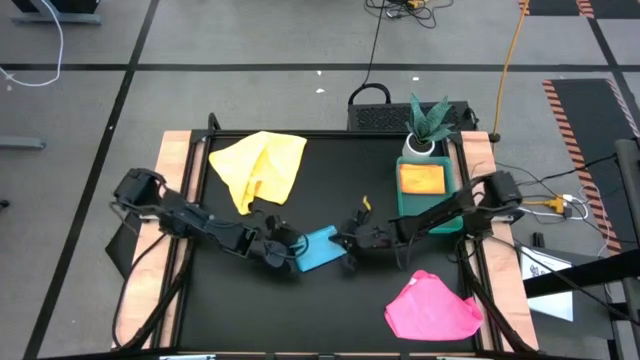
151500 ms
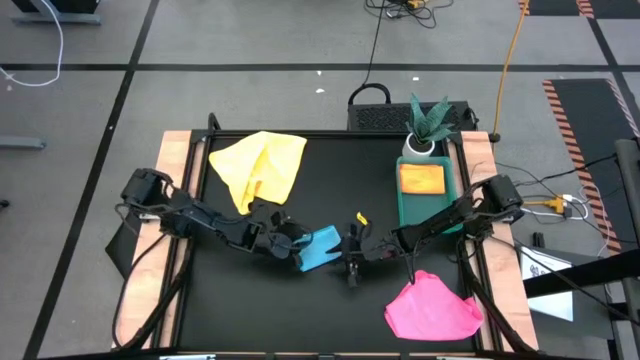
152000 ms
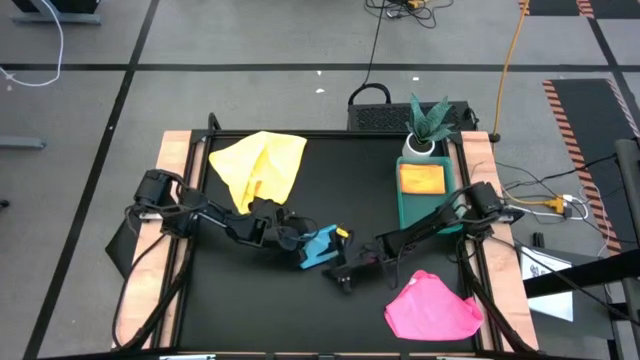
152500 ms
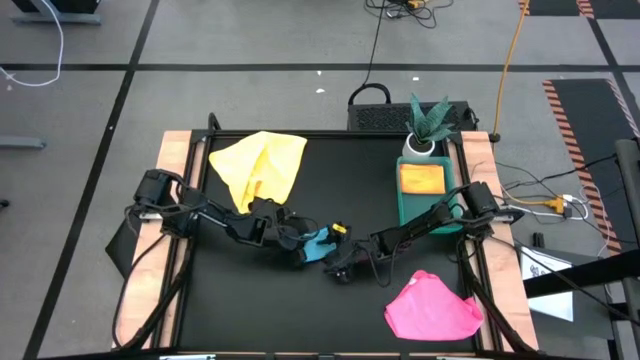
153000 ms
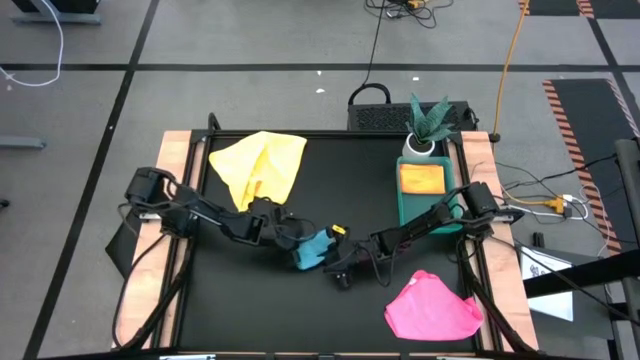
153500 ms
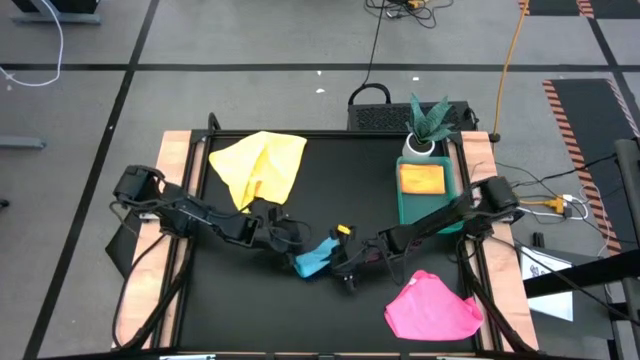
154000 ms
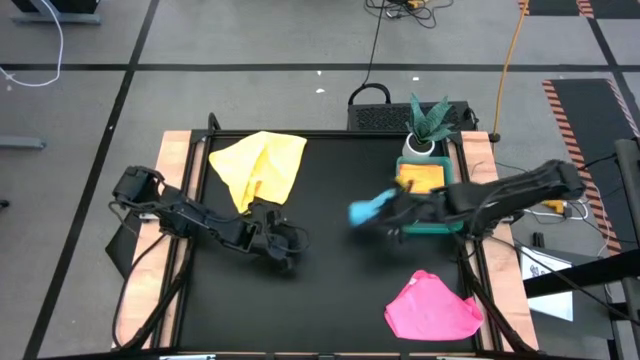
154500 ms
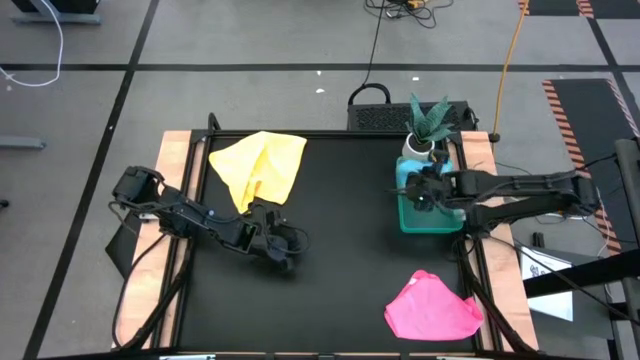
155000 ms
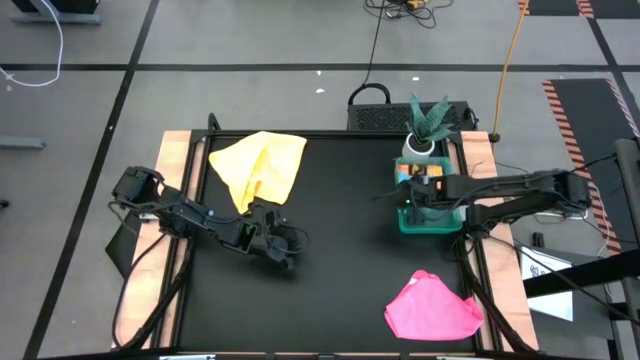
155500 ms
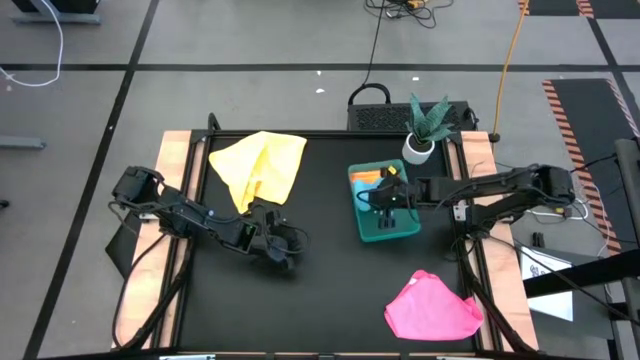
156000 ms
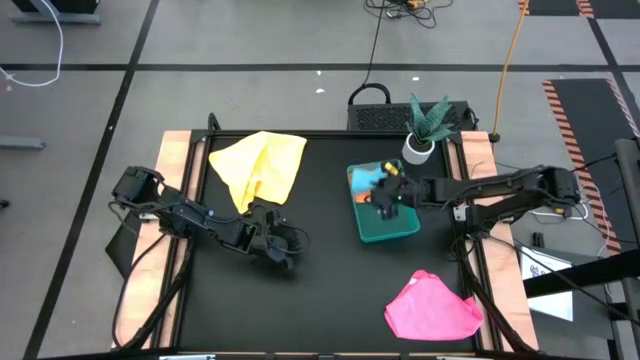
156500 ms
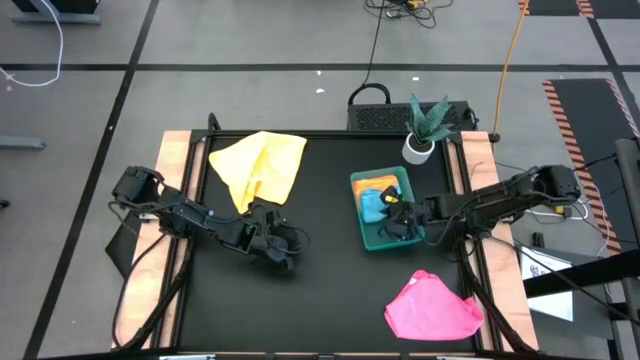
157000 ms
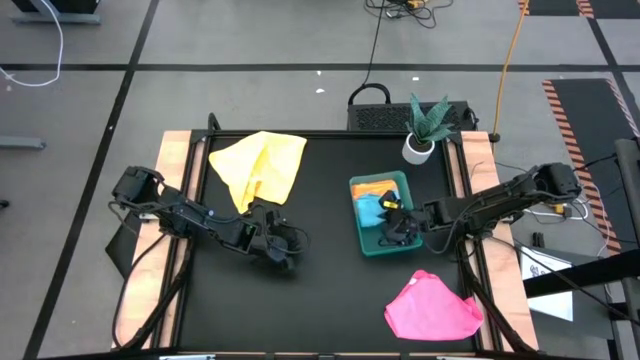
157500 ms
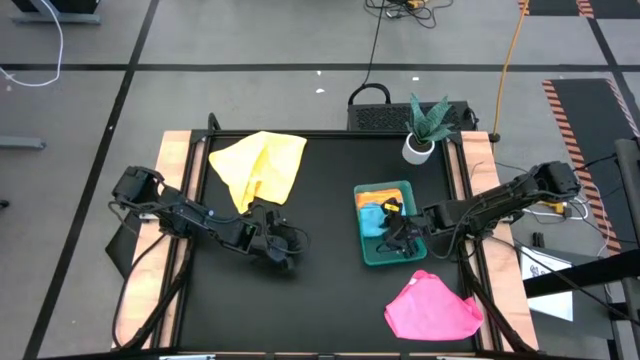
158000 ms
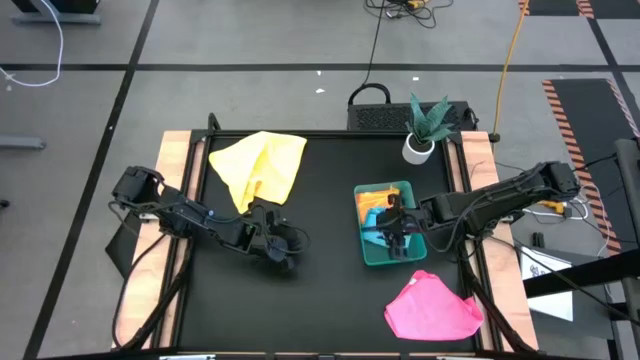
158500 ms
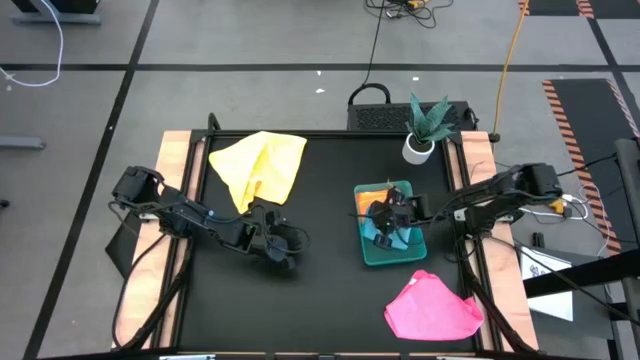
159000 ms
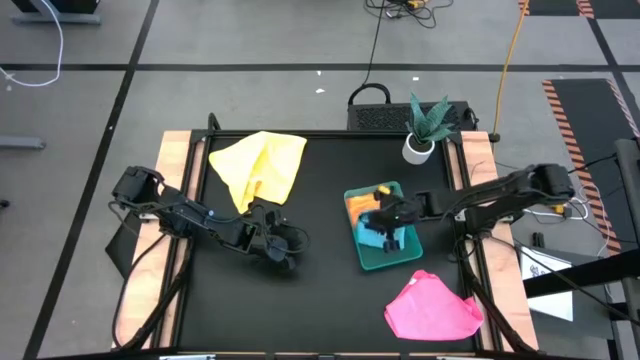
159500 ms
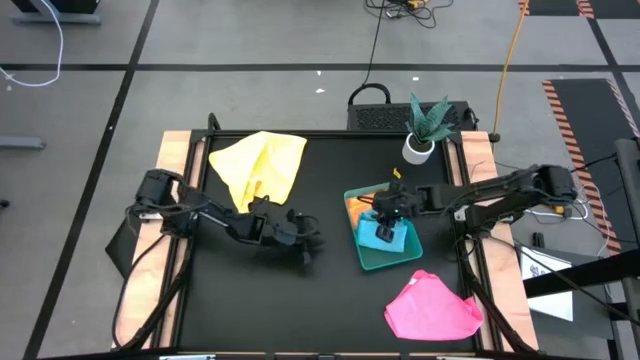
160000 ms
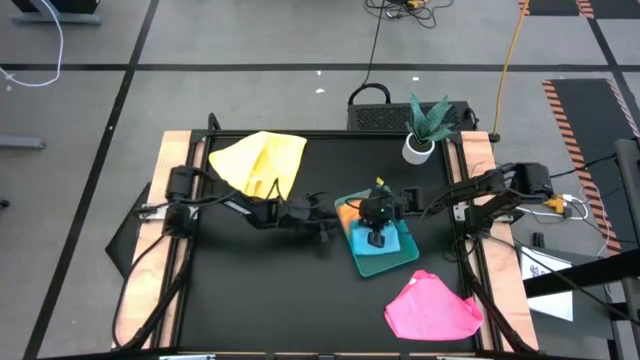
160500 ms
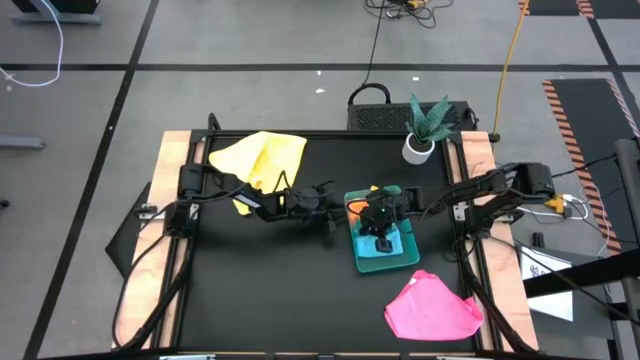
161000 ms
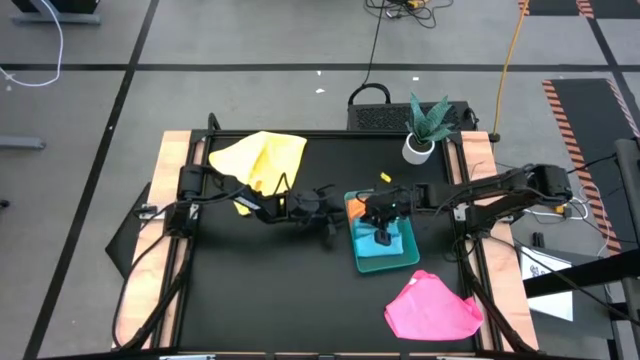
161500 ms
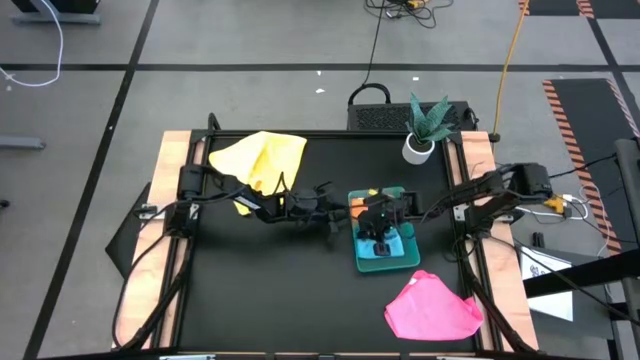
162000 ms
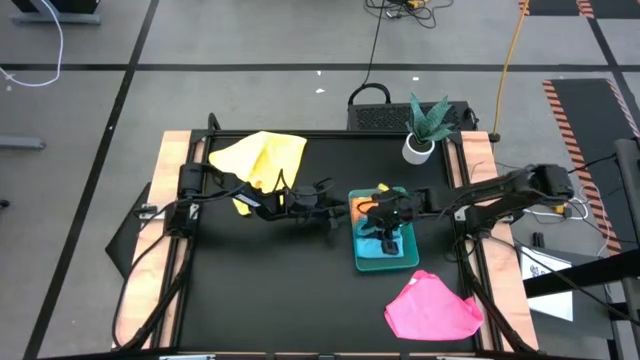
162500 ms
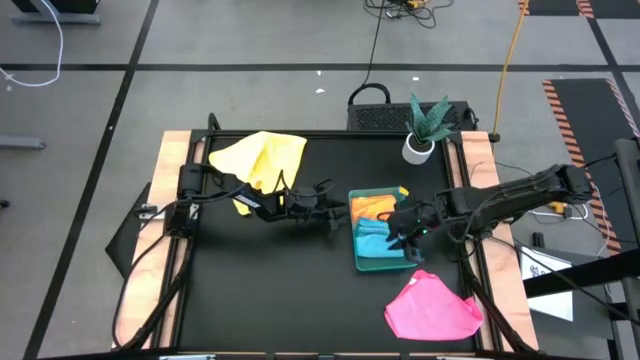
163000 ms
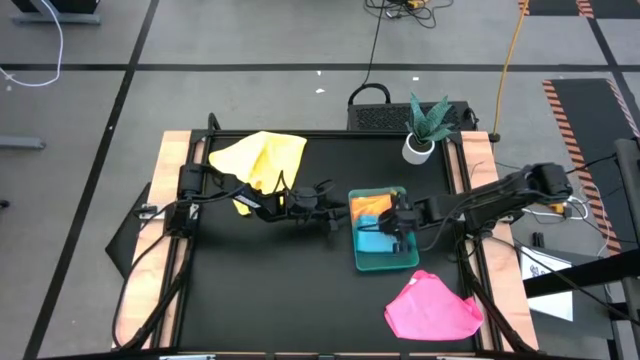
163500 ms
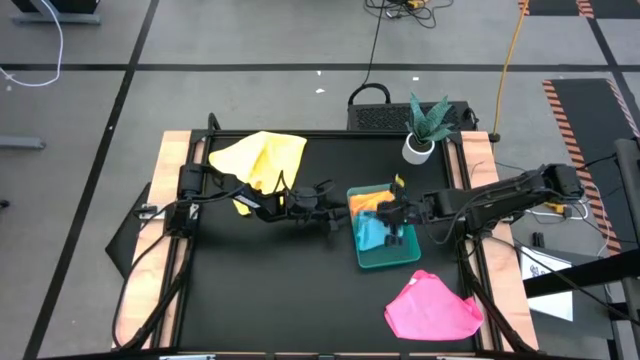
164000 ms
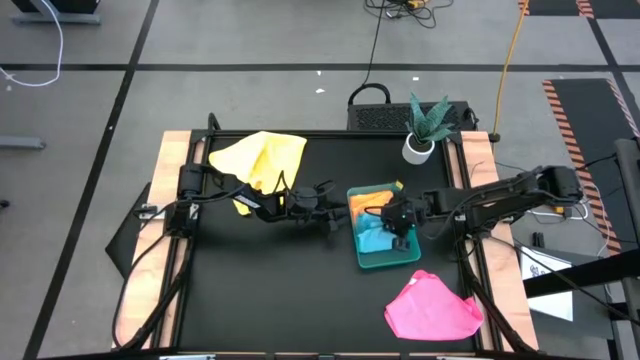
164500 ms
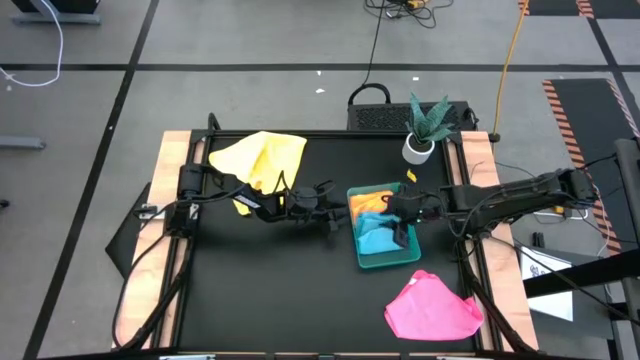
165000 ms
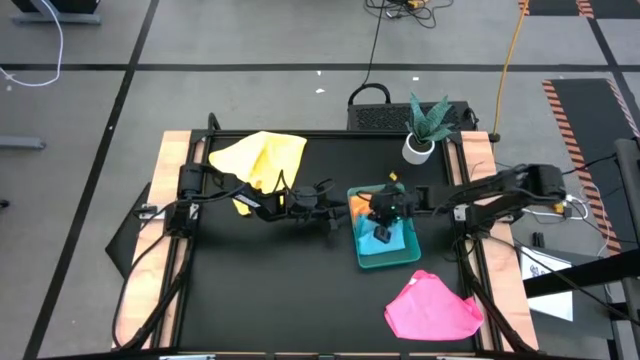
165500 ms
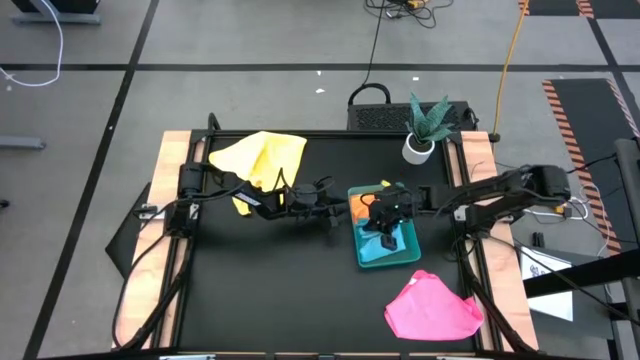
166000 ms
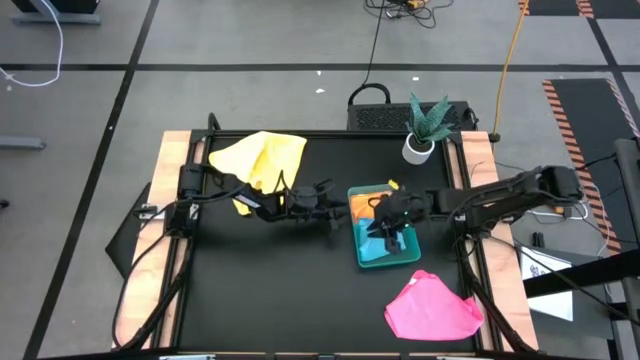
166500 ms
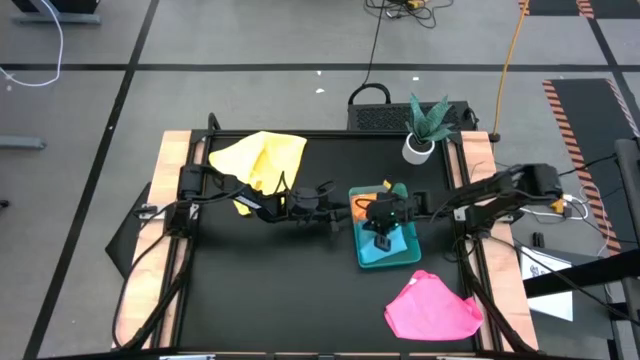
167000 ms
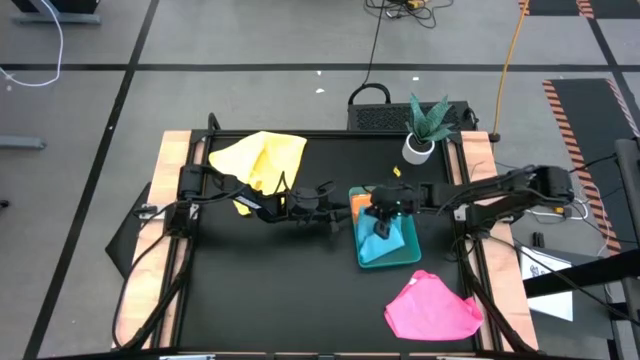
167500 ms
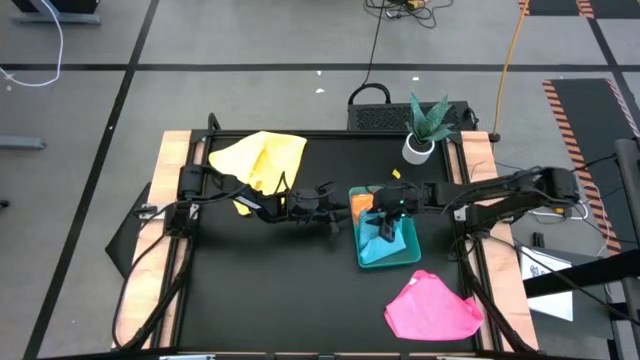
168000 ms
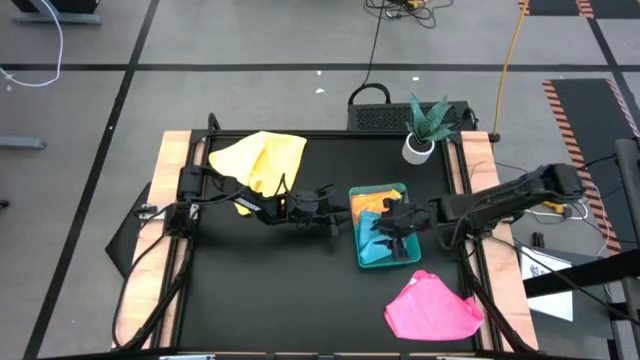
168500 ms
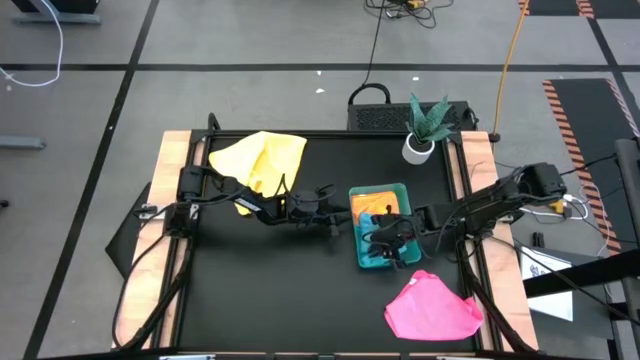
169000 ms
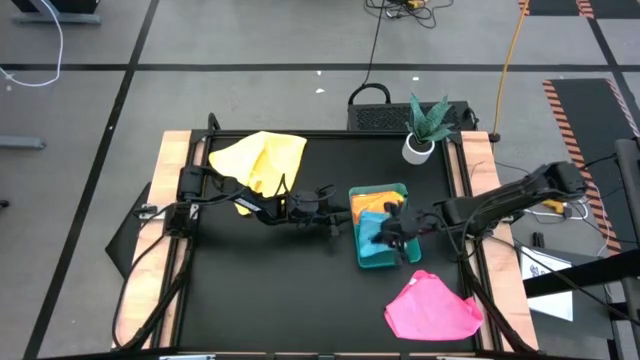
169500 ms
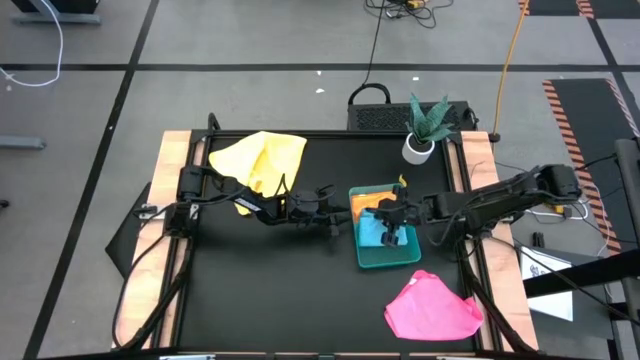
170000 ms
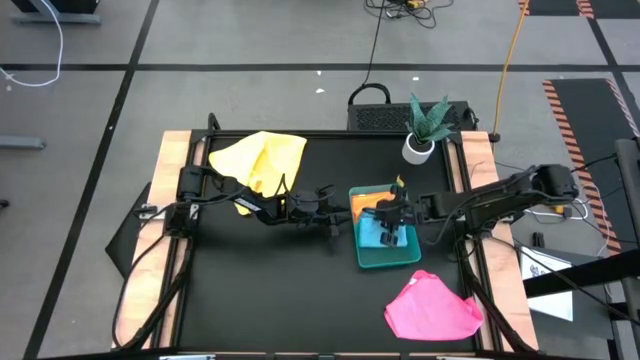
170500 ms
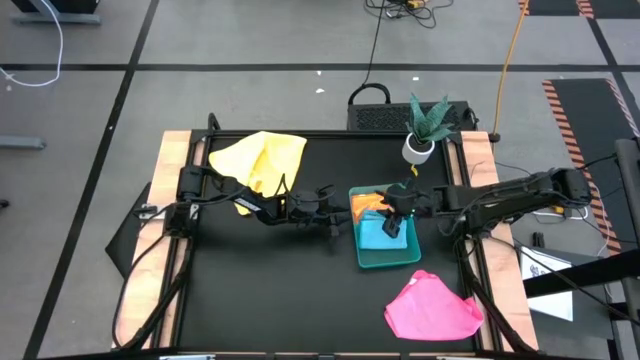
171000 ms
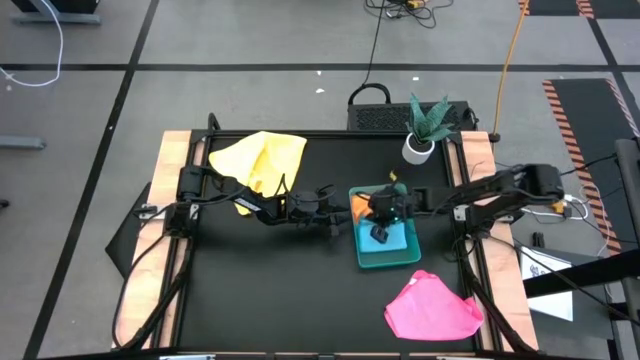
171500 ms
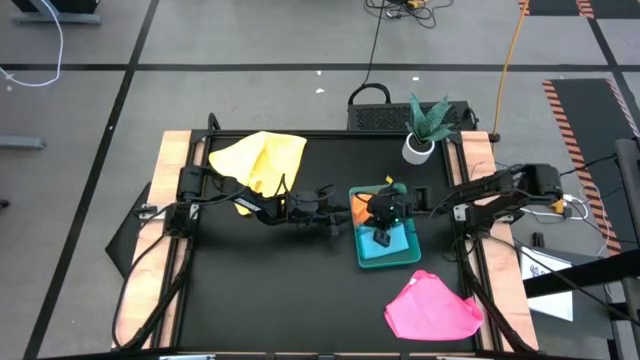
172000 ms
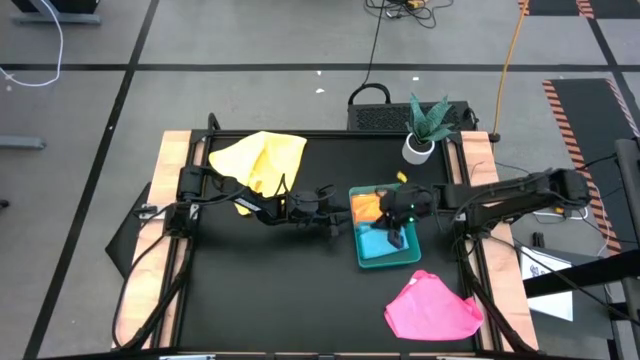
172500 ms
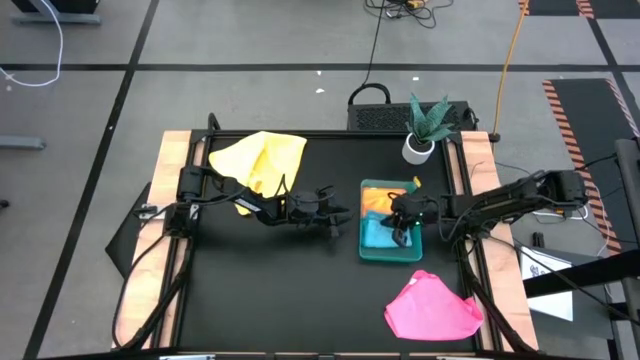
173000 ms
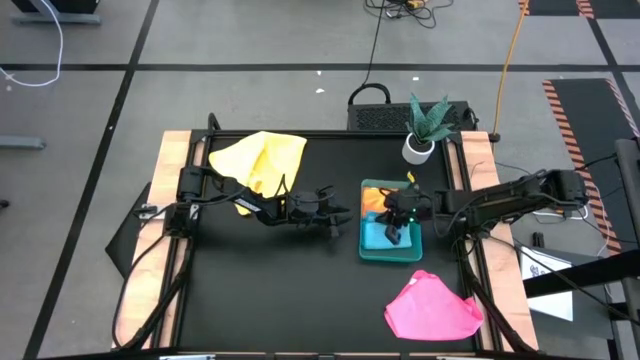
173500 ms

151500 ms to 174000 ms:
Task: Fold microfiber towels
Put the blue microfiber cloth into the green bin
